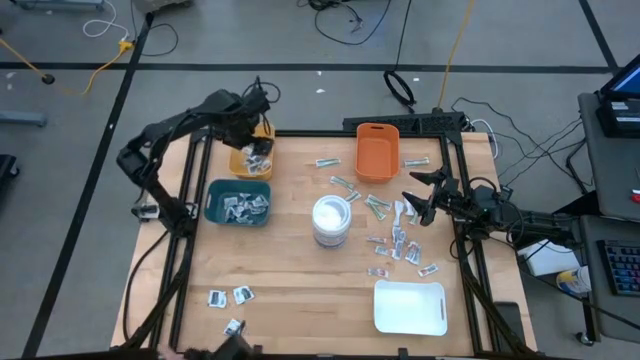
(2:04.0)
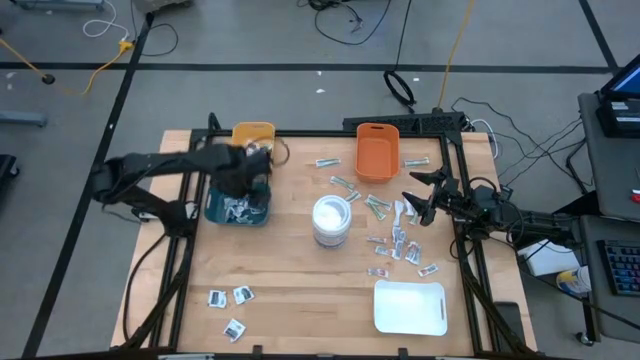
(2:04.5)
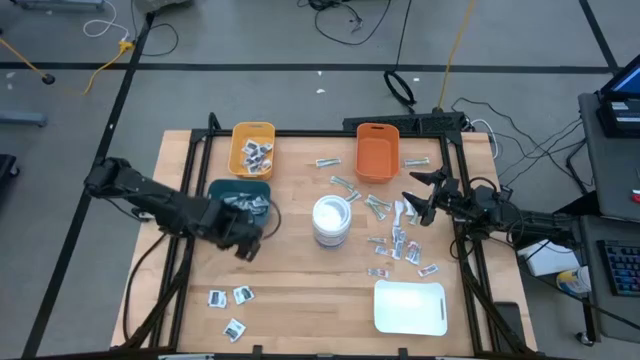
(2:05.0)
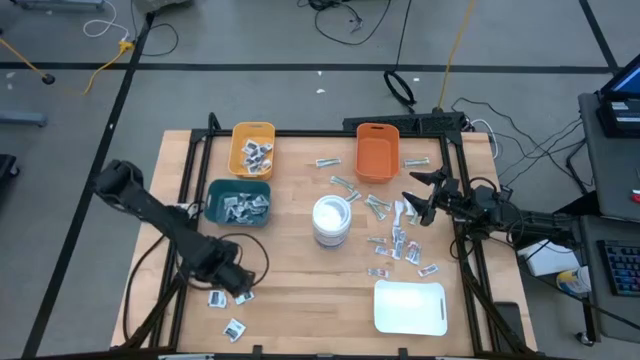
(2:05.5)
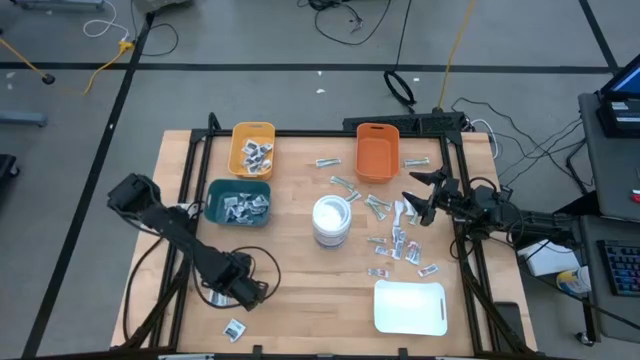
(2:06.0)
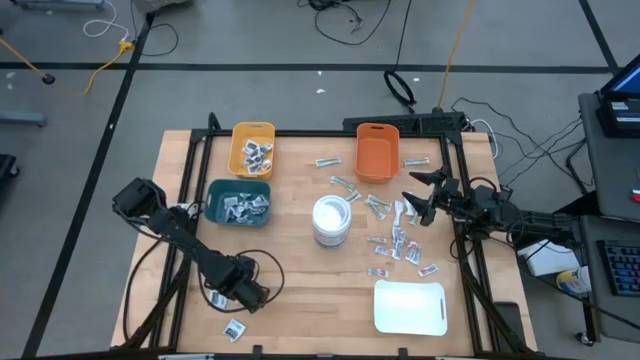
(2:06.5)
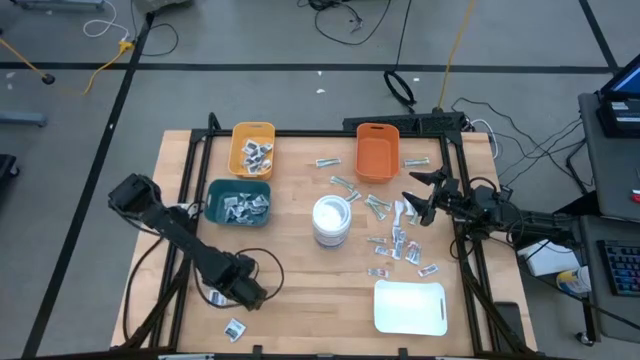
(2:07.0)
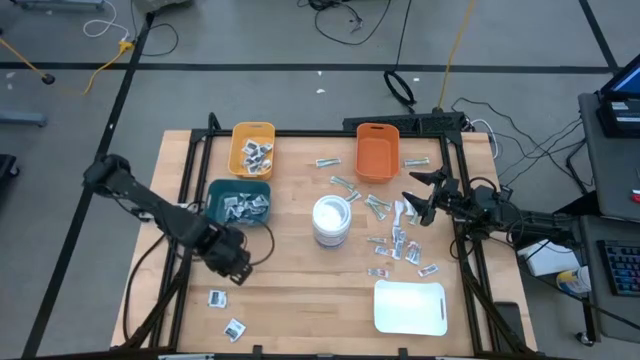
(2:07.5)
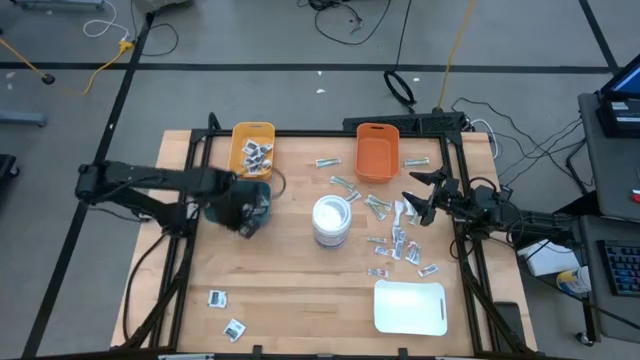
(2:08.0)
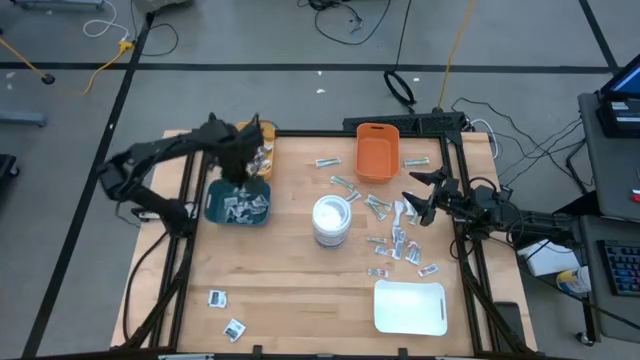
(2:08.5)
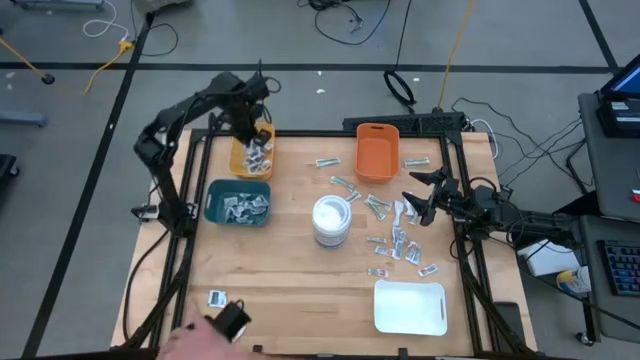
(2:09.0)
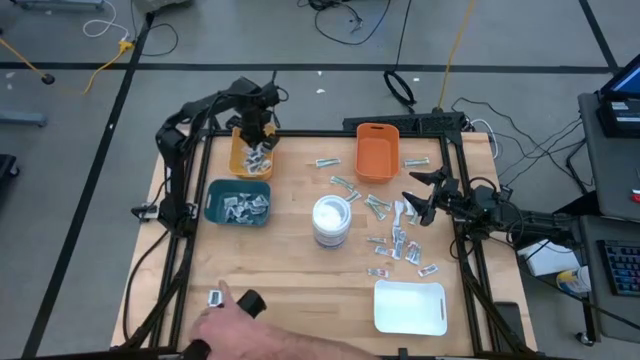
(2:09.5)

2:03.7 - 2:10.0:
Task: Pick & Place First Aid Supplies
Put the black pad into the yellow bin

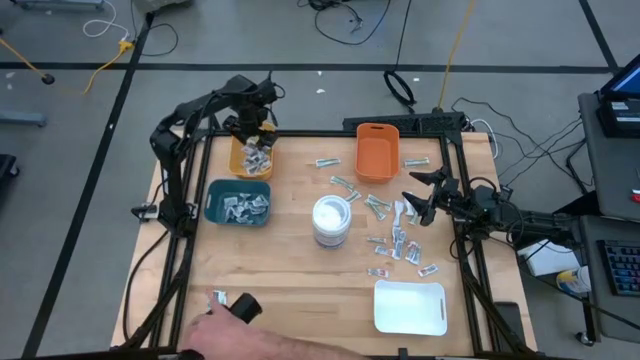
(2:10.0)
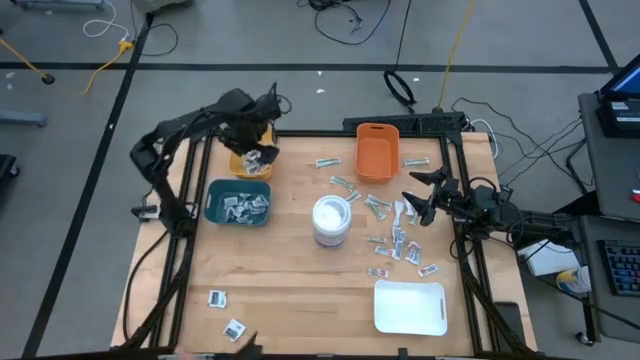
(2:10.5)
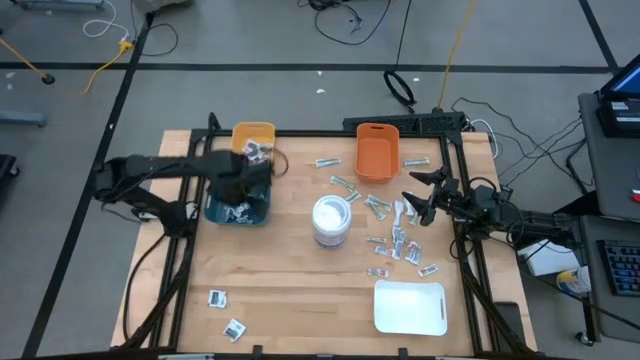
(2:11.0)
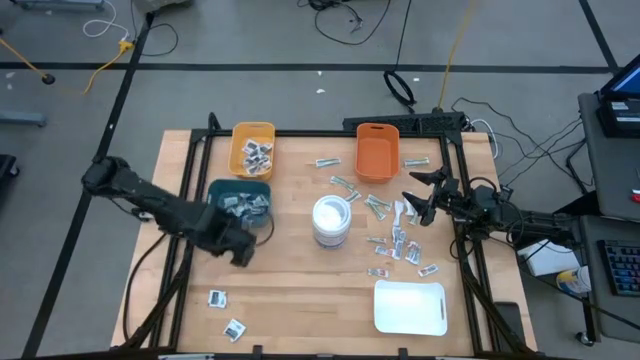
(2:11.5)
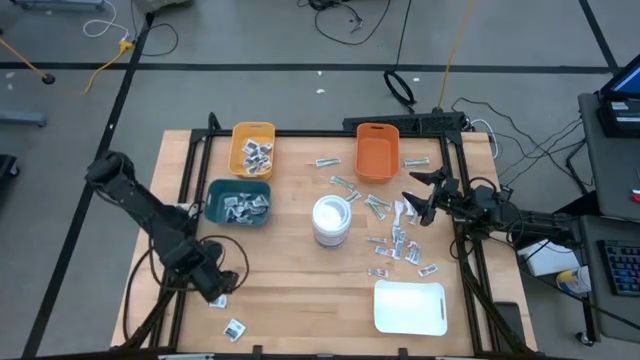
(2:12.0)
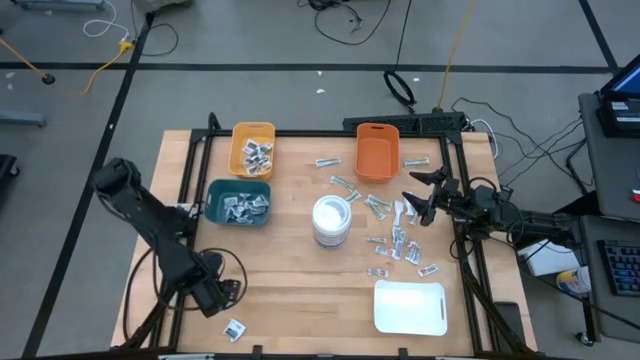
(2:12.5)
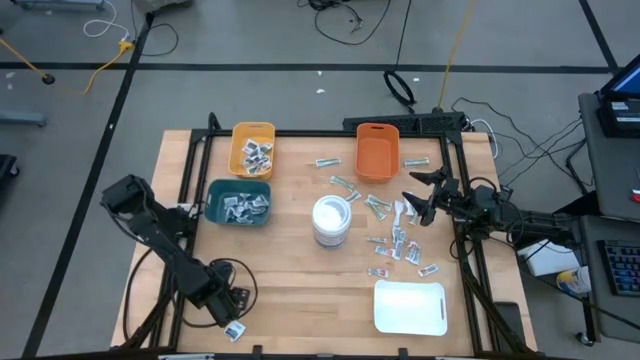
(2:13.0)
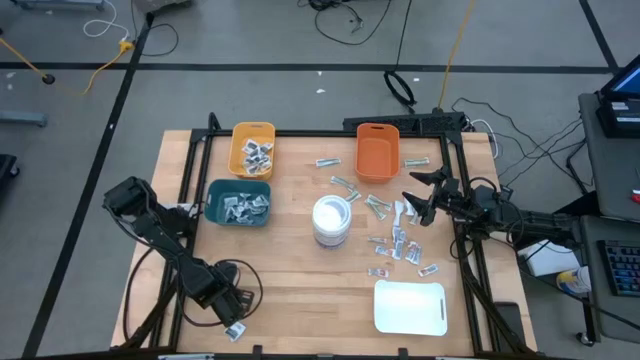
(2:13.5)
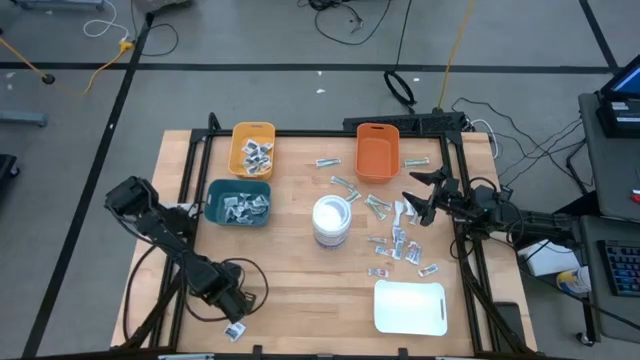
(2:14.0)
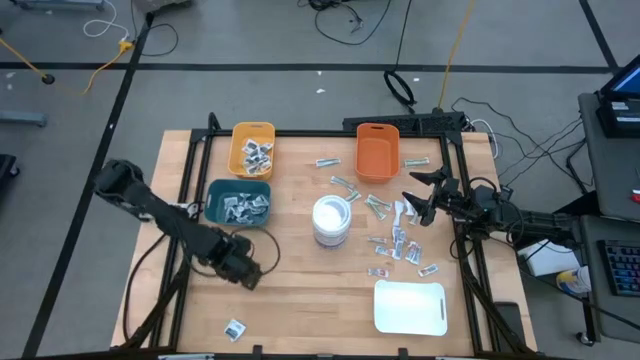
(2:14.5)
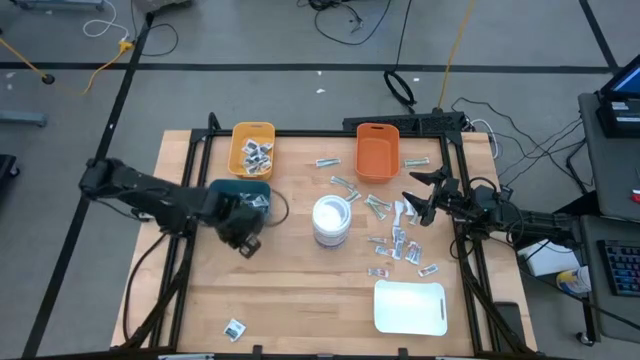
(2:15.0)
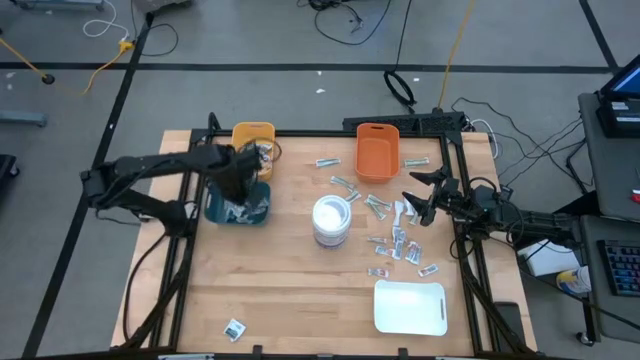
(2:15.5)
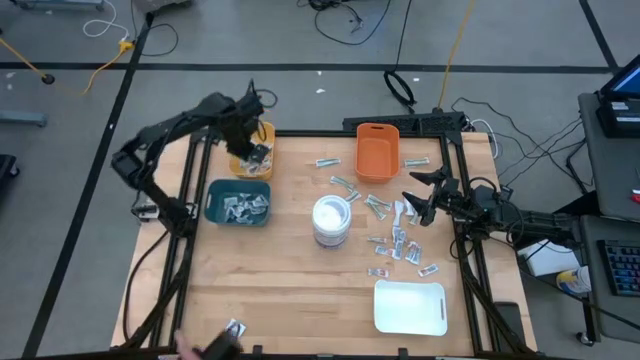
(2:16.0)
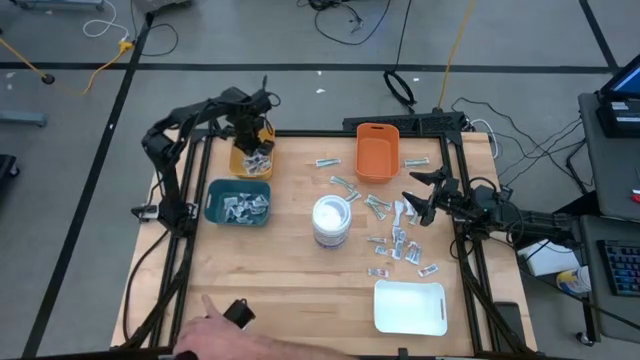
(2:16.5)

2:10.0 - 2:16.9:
Put the black pad into the yellow bin

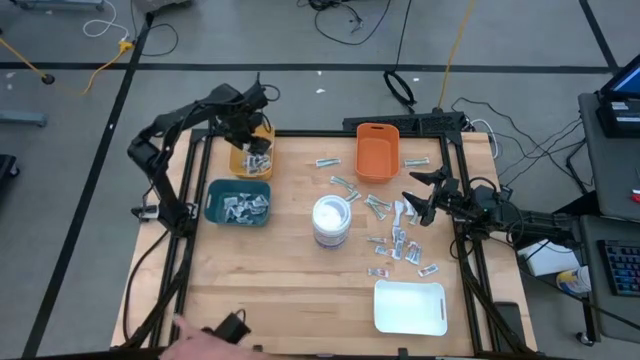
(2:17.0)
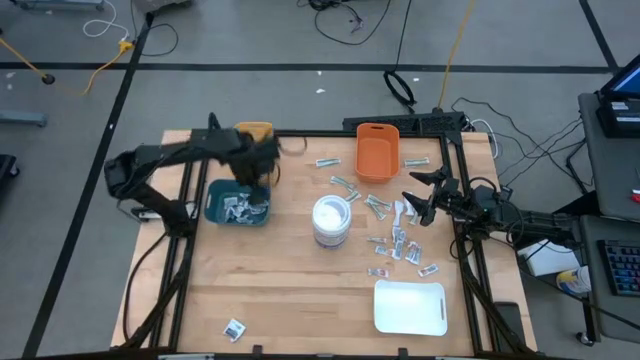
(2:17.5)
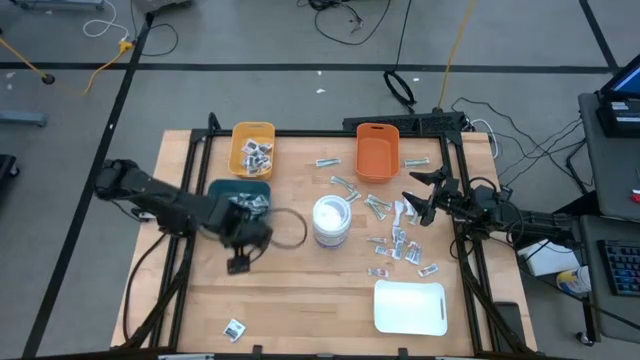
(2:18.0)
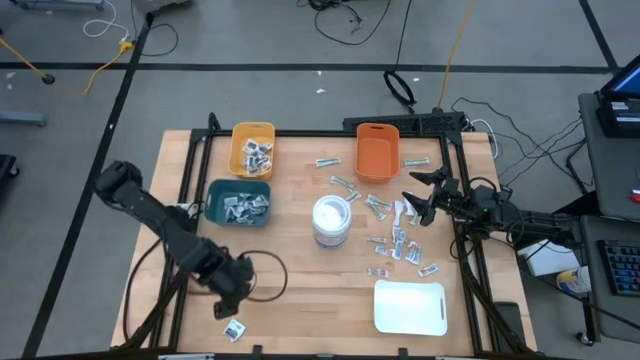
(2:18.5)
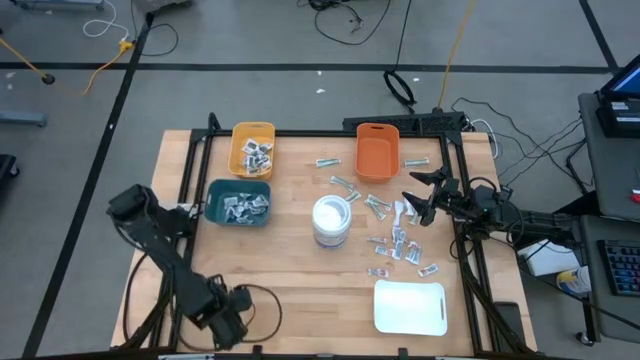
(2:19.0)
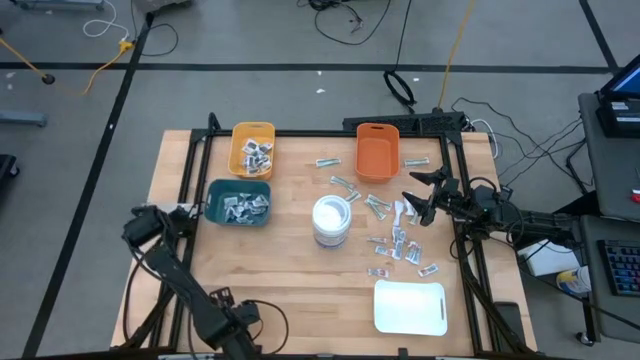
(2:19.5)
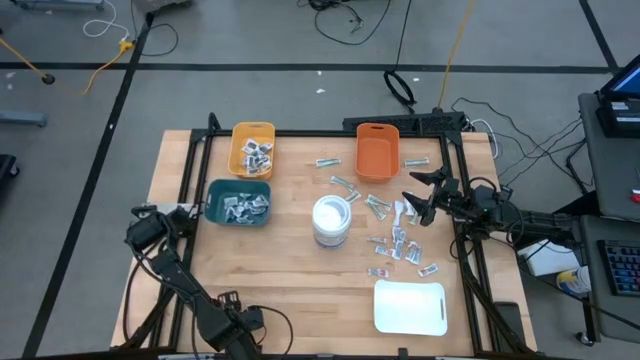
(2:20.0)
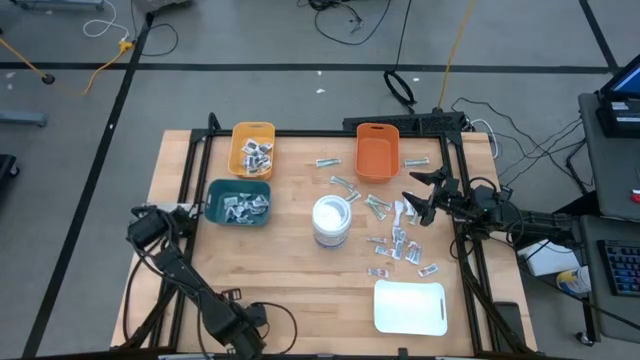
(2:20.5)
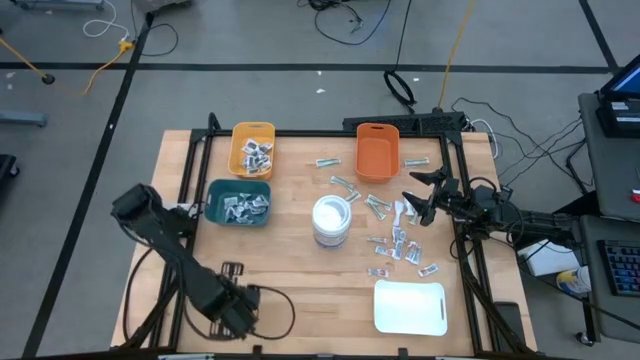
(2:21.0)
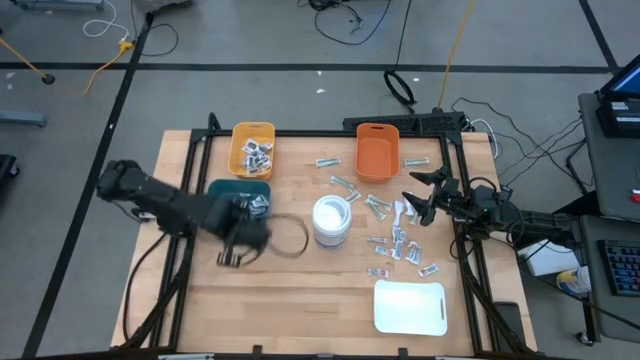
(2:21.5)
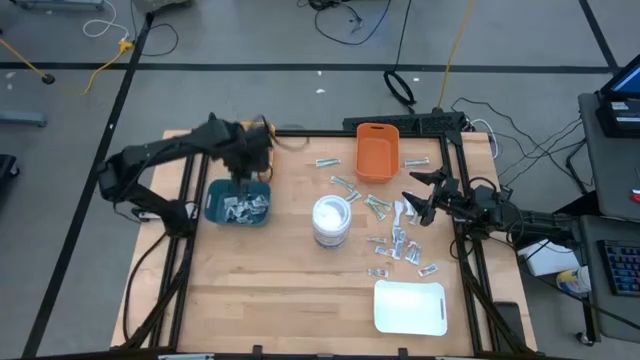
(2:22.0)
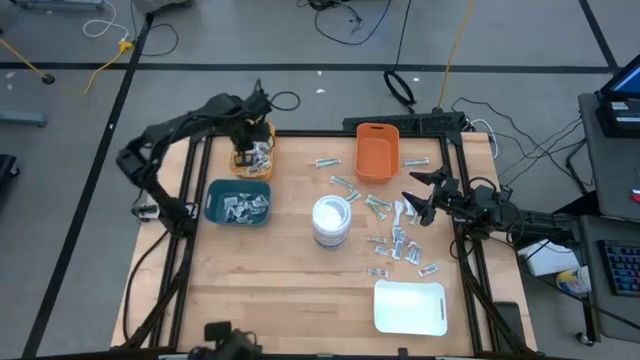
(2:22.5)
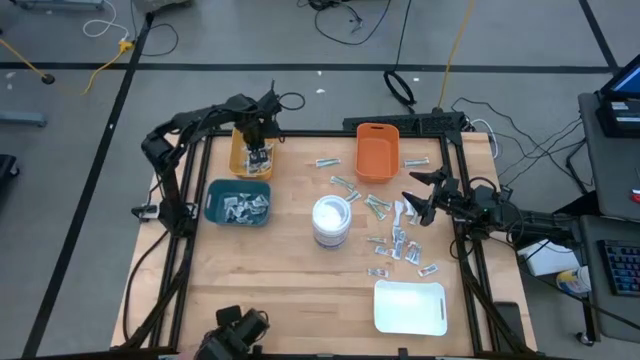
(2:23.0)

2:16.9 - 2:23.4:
Put the black pad into the yellow bin

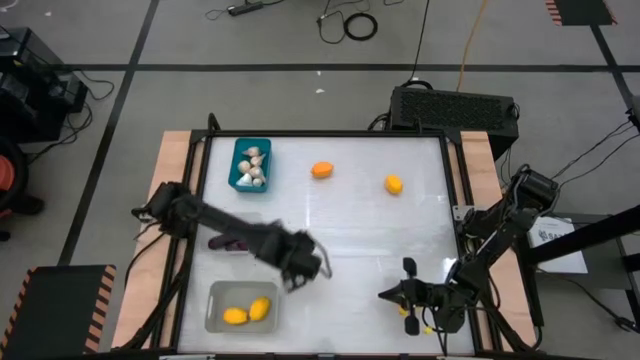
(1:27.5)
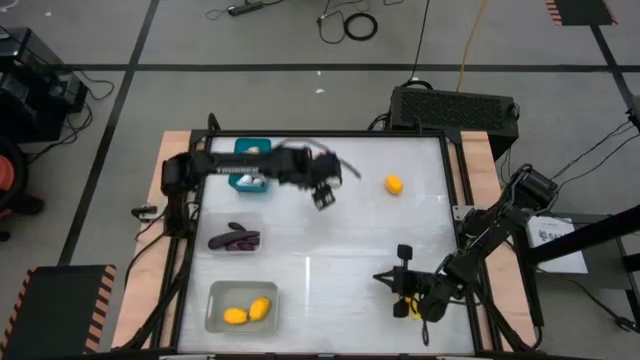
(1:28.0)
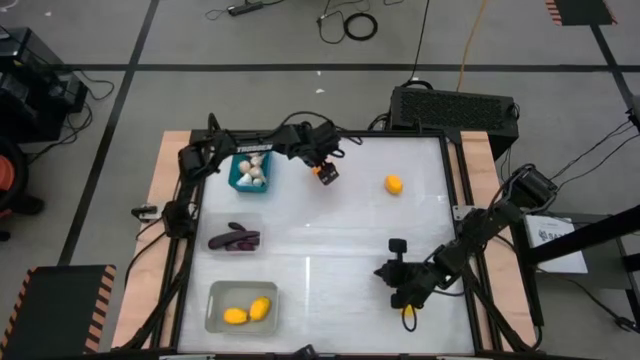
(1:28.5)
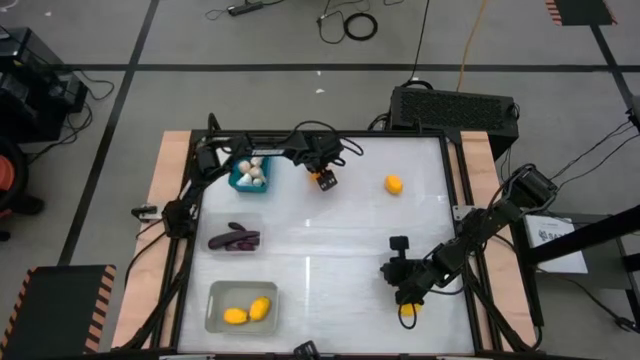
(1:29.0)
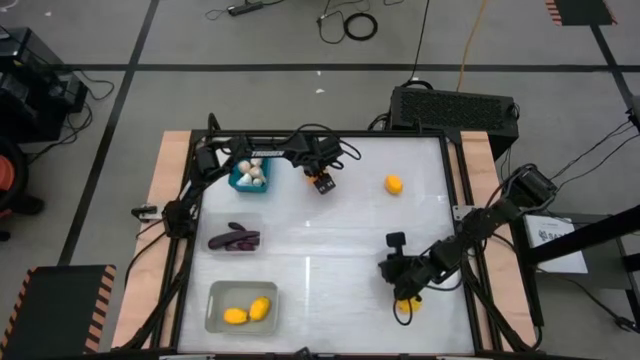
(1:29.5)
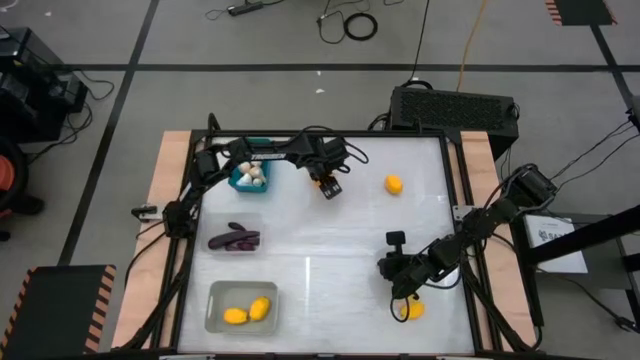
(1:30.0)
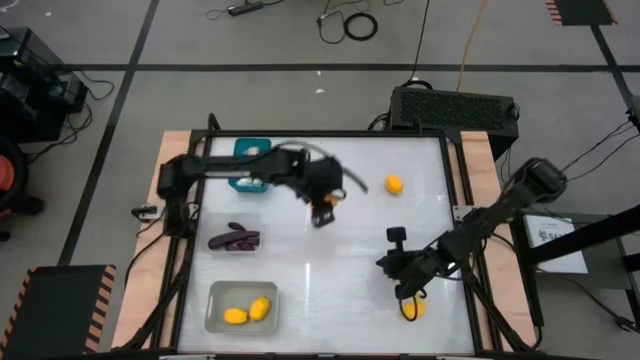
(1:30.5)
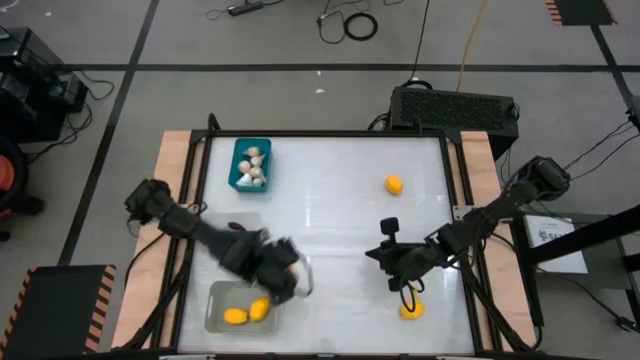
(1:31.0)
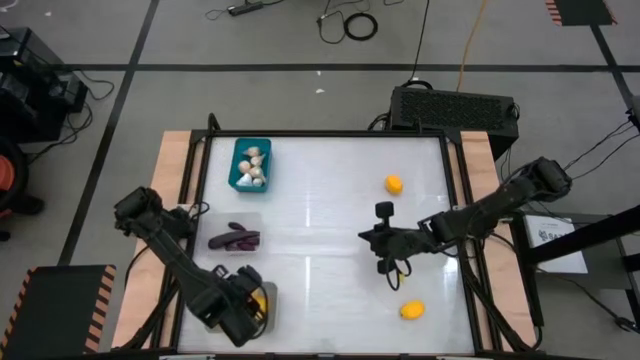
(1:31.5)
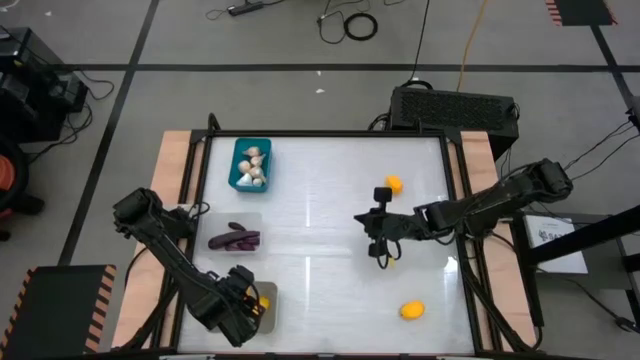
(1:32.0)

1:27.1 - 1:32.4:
Task: Sort produce into baskets
Put the lemon into the gray bin
